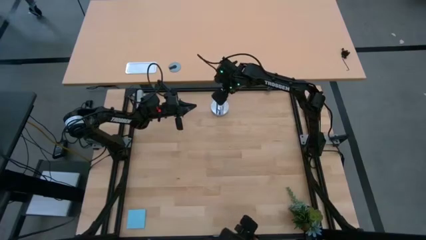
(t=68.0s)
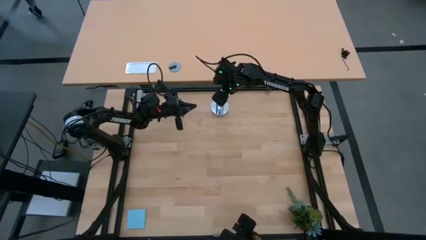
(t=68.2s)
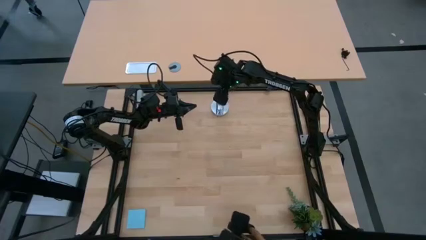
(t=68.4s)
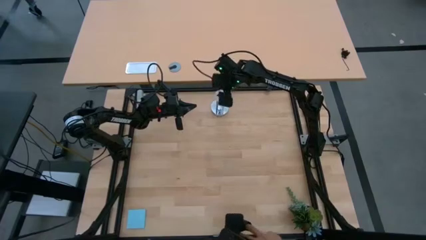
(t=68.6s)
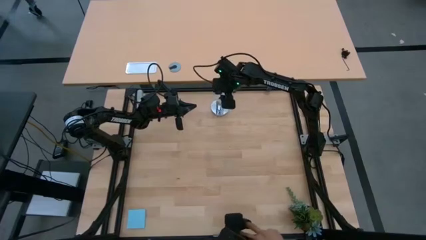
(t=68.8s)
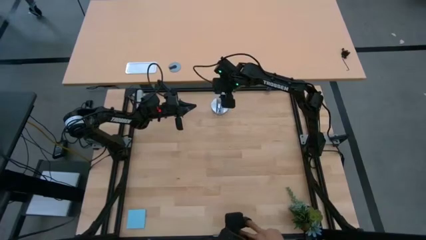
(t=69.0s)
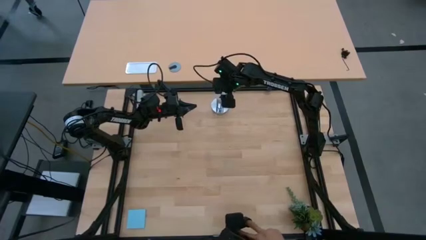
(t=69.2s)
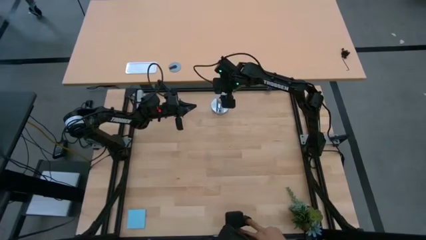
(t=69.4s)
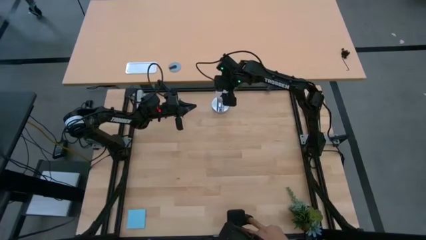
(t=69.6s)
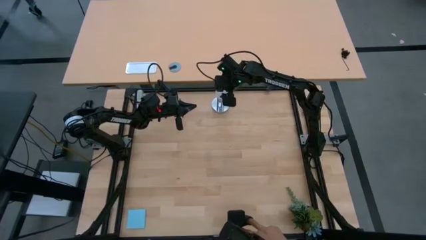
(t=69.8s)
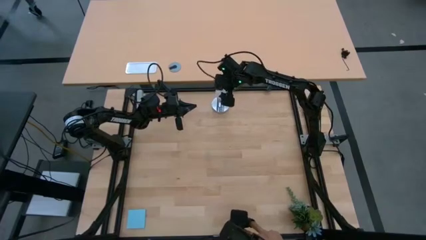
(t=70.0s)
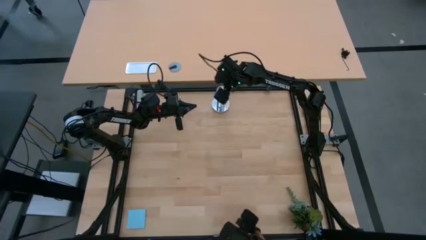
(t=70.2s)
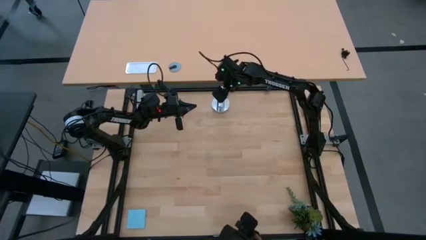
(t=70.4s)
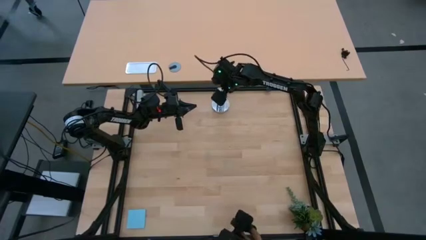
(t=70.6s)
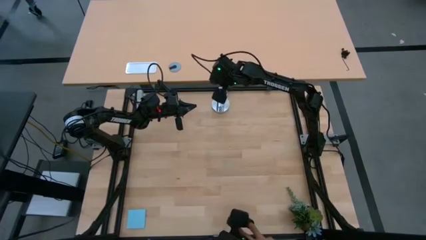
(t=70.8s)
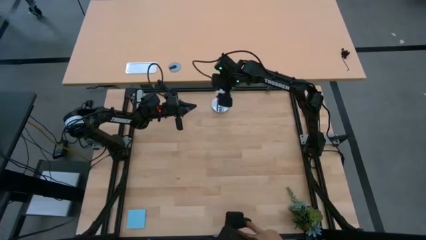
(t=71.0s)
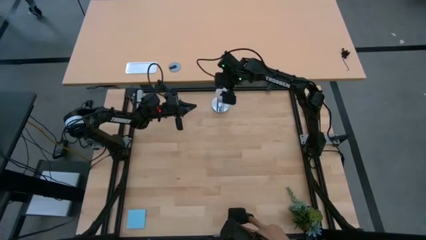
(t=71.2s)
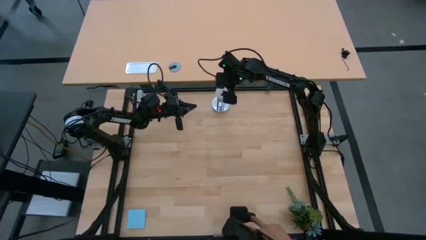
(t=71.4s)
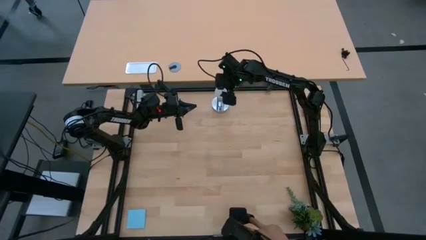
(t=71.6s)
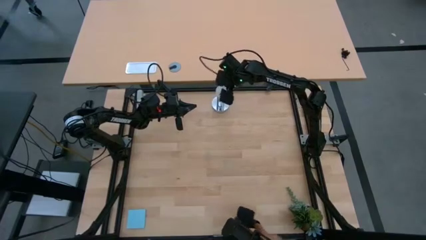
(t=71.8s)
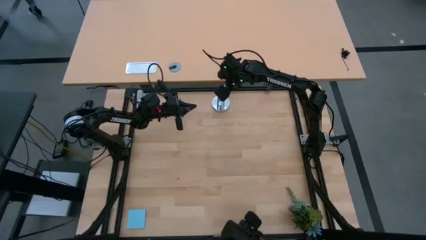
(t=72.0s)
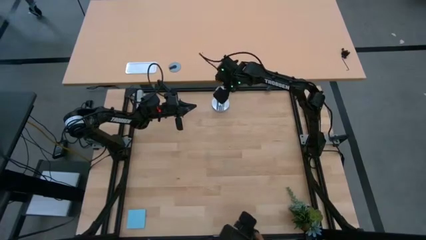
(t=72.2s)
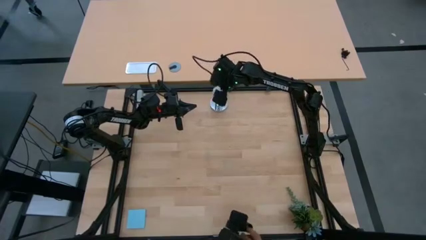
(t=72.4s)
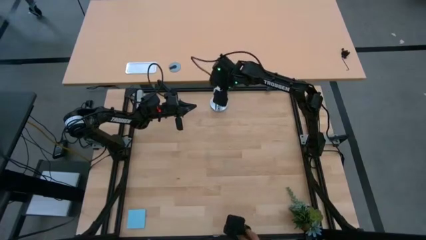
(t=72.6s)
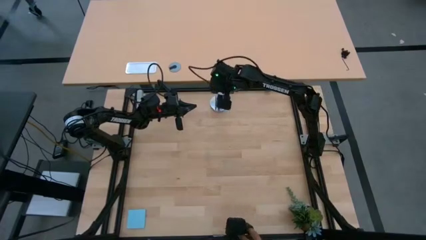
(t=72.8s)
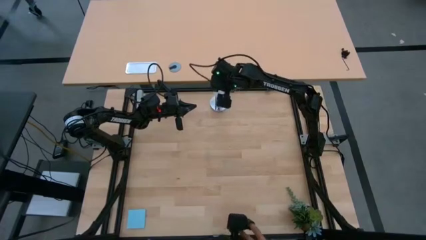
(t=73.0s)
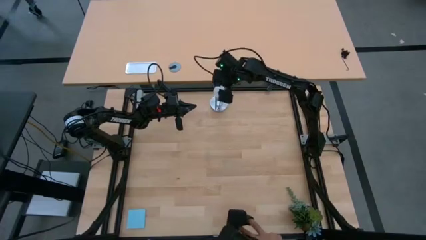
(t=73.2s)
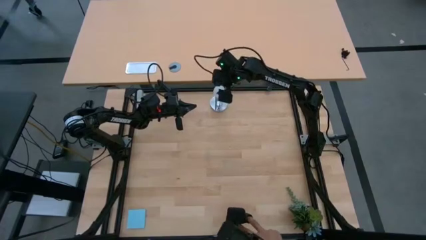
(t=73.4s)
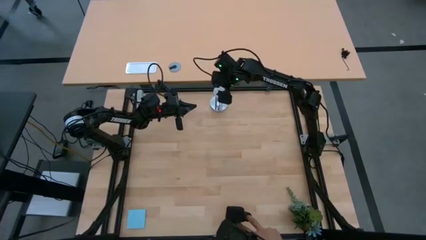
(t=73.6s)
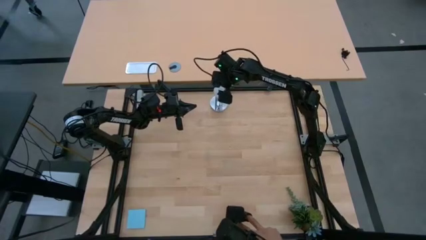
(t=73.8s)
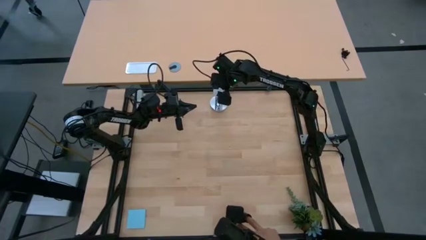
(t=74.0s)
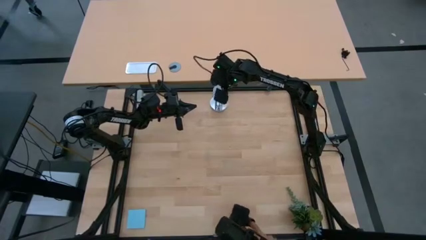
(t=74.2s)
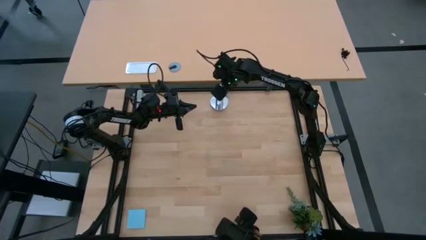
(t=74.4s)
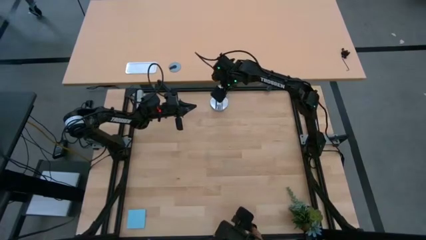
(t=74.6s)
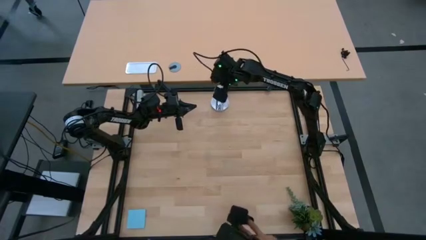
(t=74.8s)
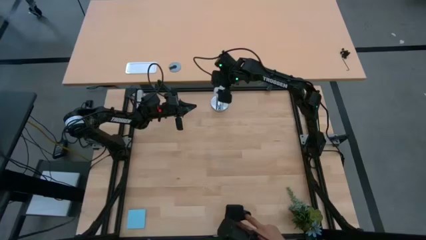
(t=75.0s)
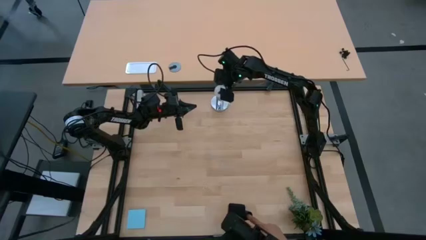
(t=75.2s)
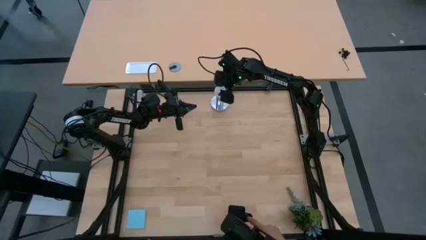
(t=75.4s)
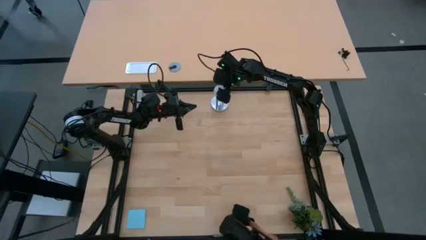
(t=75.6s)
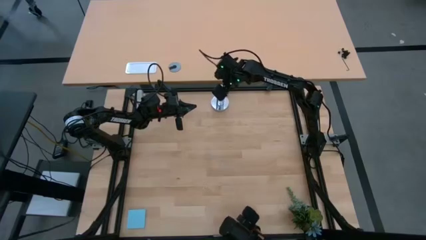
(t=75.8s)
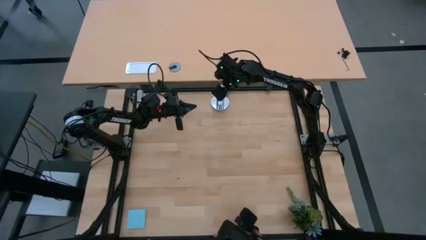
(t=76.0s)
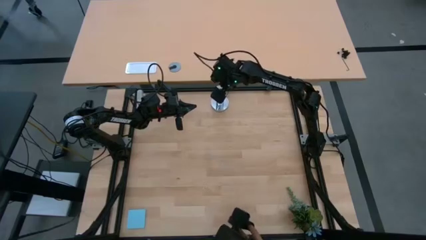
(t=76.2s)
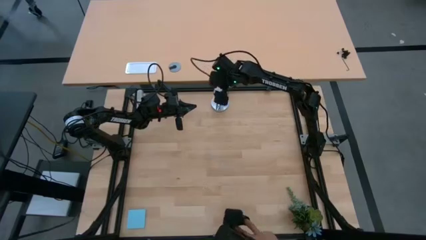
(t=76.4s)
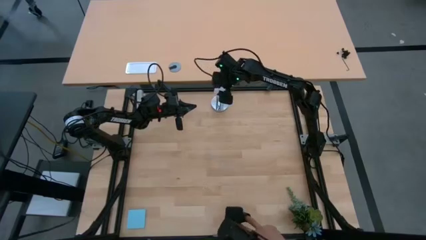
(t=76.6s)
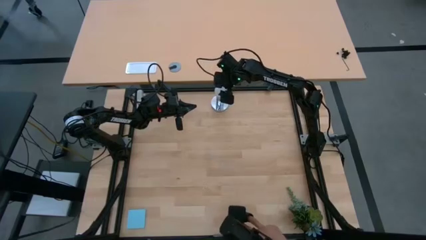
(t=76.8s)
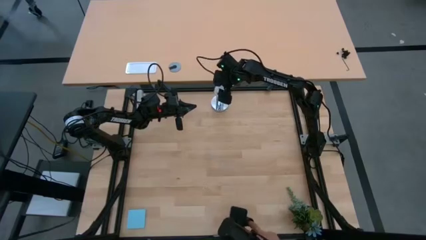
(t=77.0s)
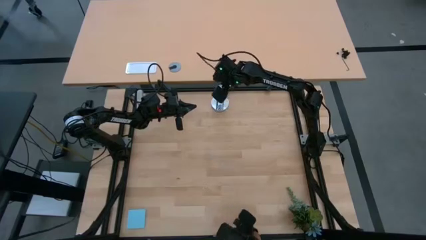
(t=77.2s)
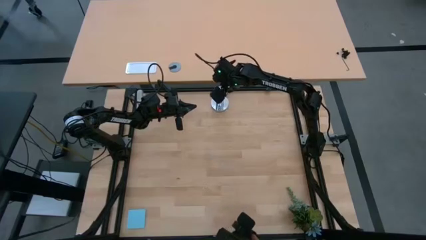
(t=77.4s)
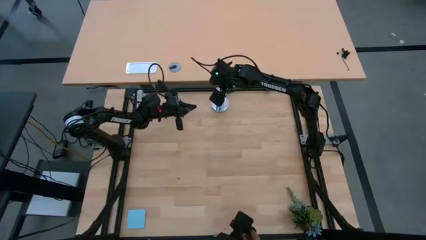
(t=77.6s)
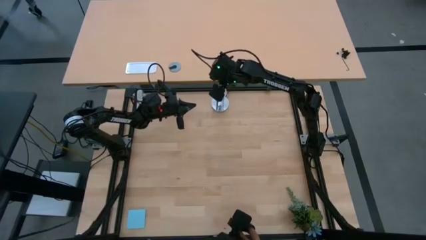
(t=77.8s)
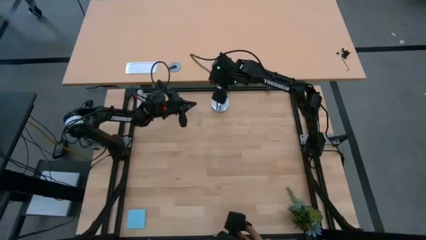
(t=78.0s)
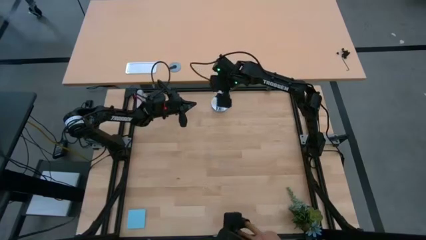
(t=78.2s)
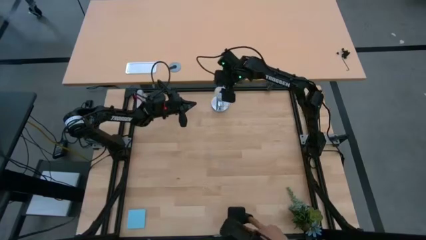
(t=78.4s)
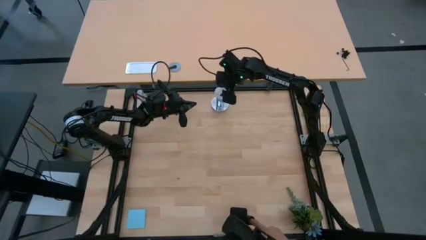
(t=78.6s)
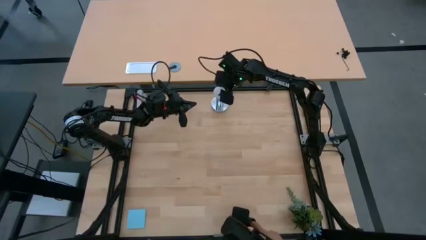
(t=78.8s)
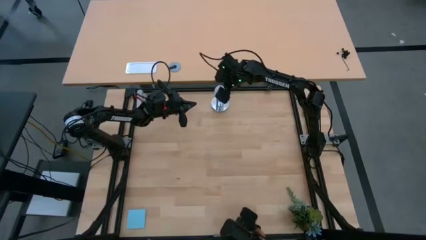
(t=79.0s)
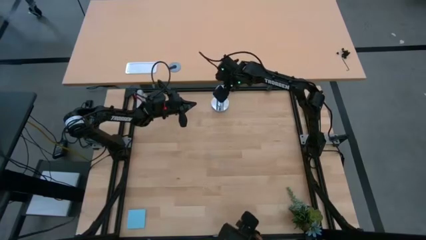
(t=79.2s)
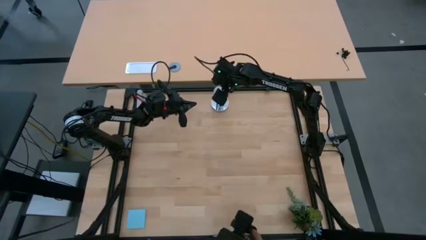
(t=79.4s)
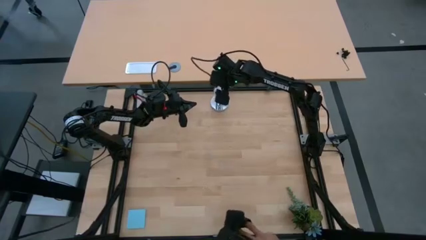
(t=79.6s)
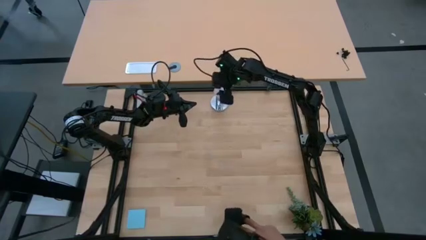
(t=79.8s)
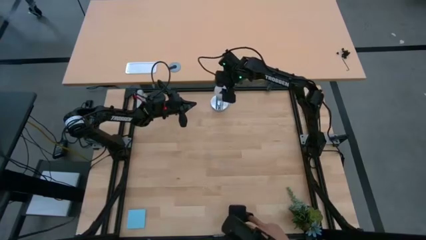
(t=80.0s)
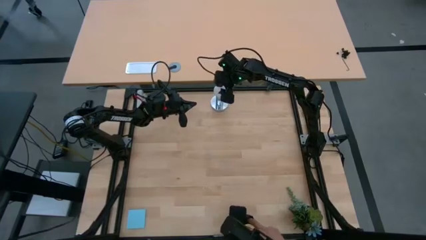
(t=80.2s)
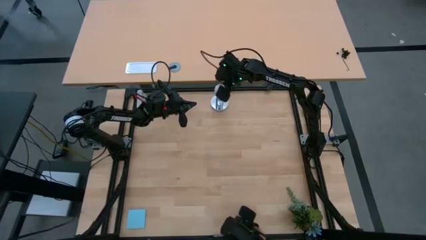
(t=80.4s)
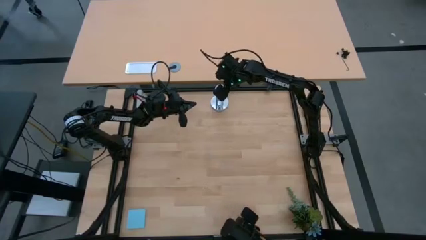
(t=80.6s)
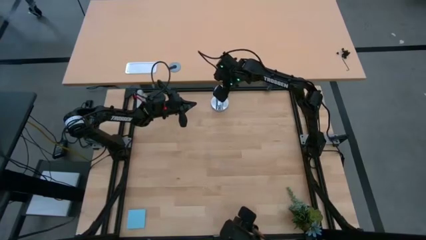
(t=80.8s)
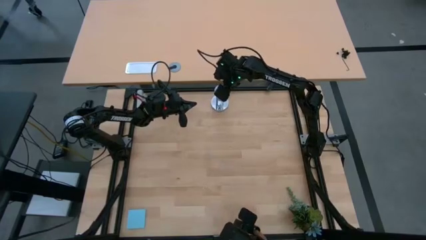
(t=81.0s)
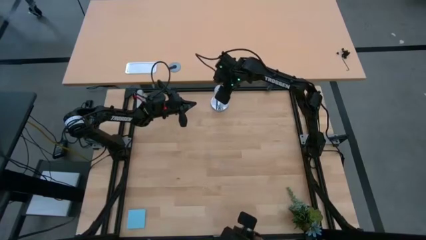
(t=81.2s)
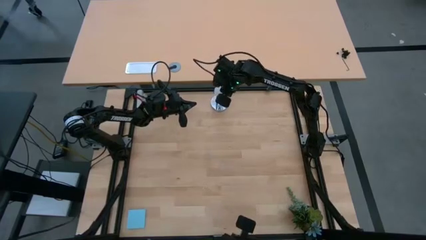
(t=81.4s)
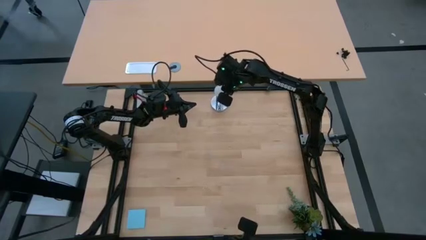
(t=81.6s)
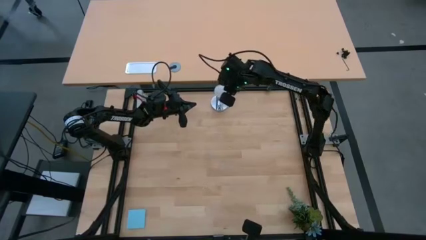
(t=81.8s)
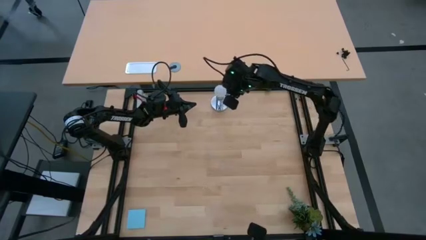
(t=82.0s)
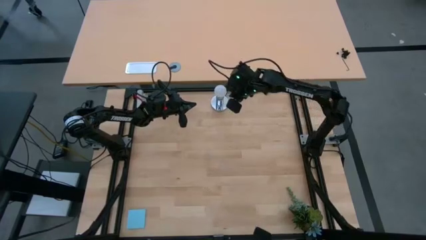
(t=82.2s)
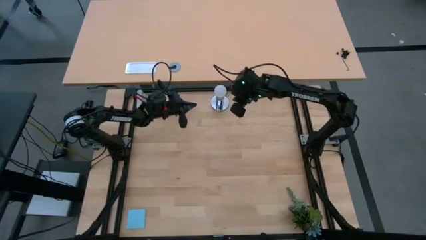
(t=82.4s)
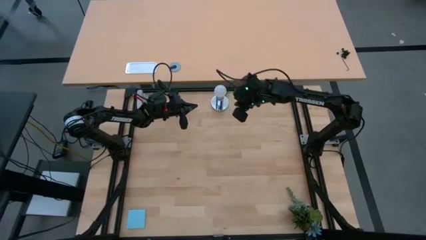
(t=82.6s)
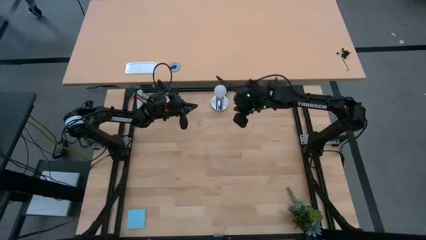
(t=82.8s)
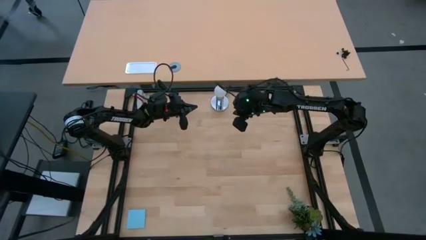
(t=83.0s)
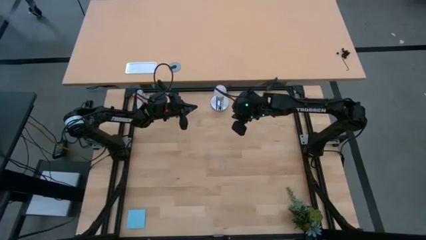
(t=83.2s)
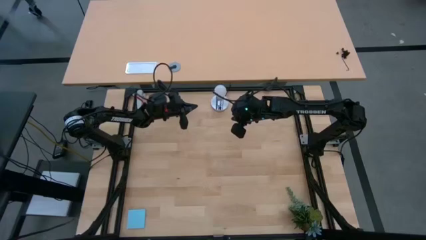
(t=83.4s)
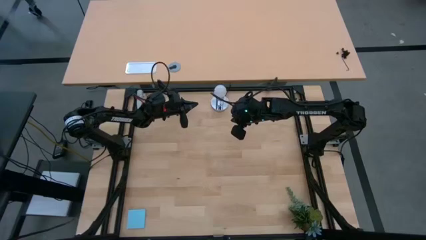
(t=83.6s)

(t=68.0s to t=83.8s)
Task: Screw lightbulb
Insert the white lightbulb into the silver lamp

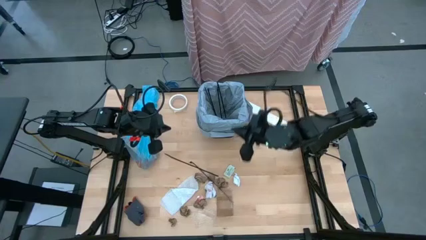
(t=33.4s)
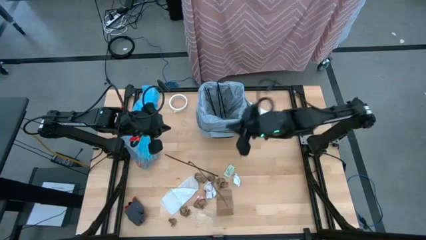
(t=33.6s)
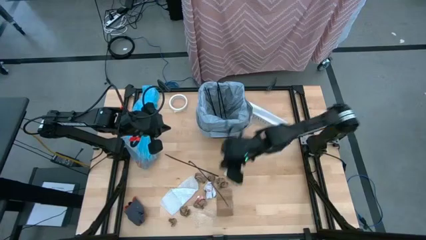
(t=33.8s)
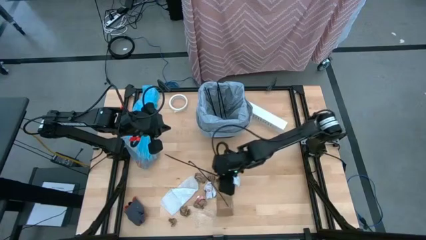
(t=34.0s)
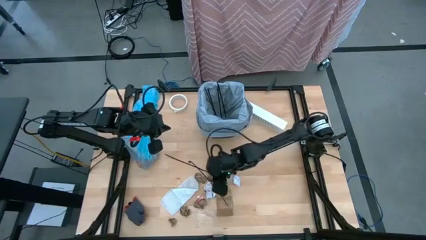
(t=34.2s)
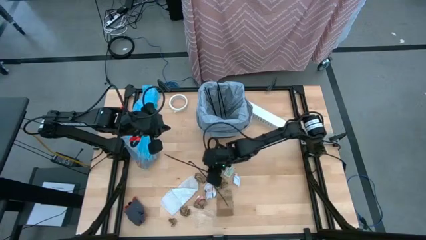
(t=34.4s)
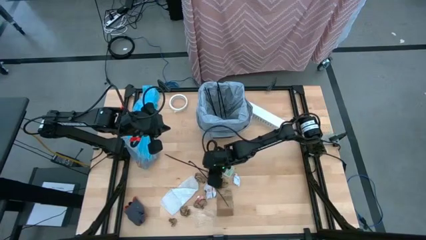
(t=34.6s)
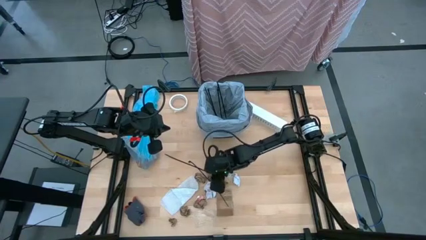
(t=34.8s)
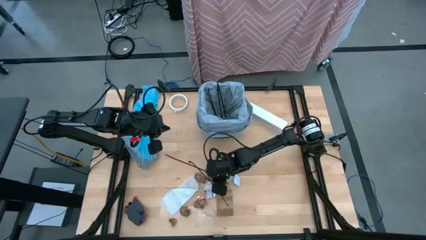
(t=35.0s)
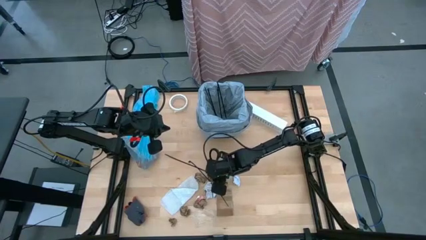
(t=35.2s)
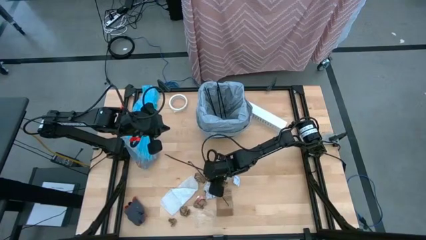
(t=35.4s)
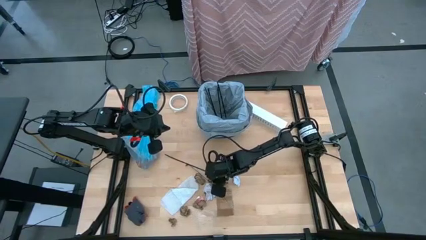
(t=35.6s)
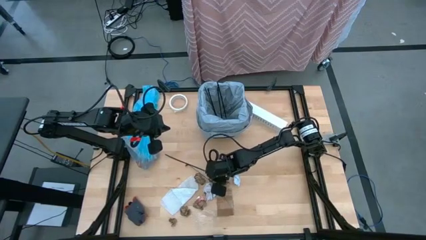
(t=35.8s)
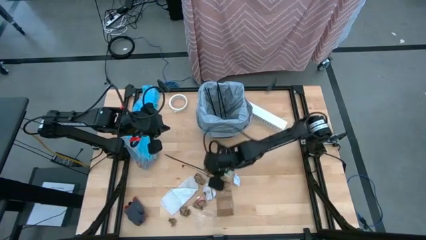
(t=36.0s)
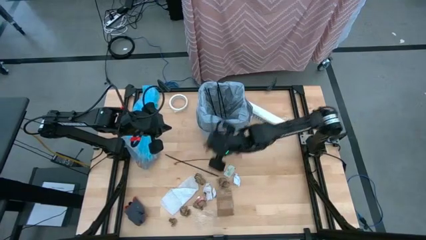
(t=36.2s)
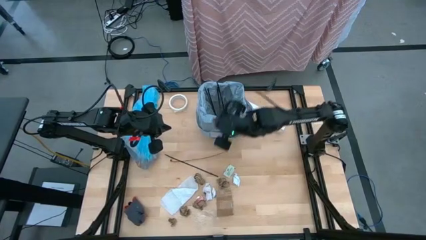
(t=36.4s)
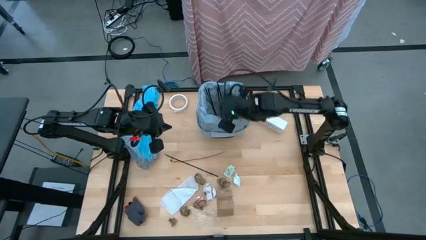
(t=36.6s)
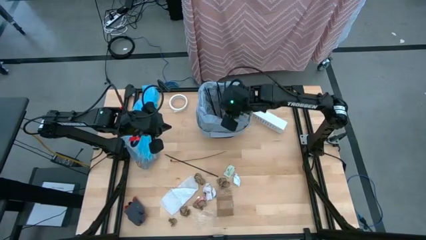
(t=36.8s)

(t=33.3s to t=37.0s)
Task: place trash/remove bag and relplace
Put the brown napkin into the trash bin
